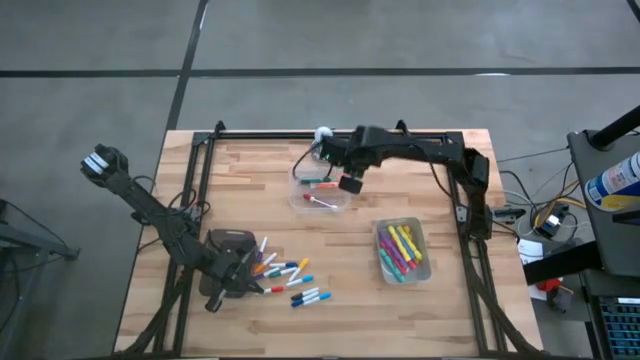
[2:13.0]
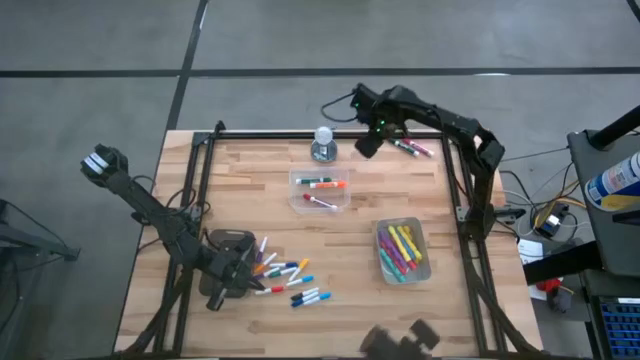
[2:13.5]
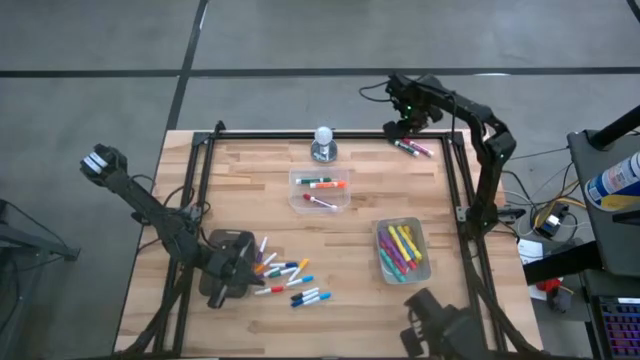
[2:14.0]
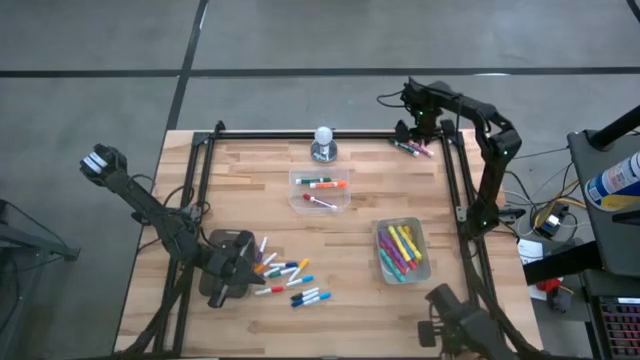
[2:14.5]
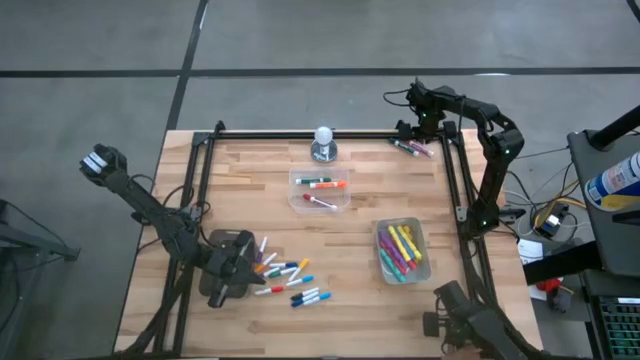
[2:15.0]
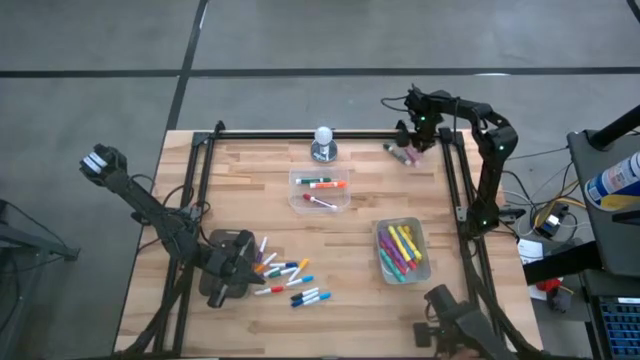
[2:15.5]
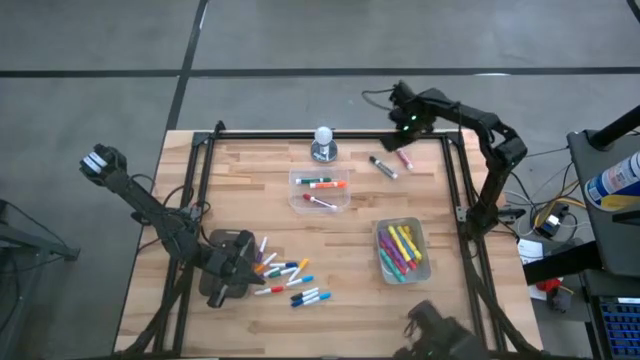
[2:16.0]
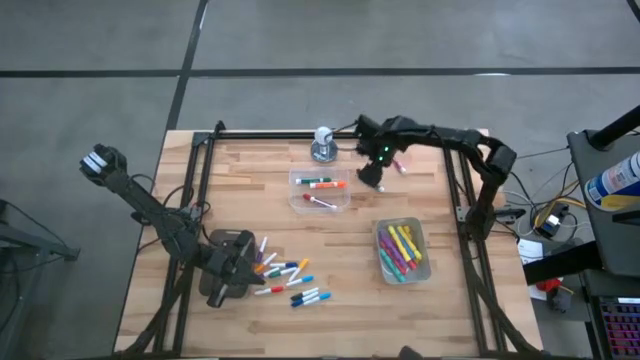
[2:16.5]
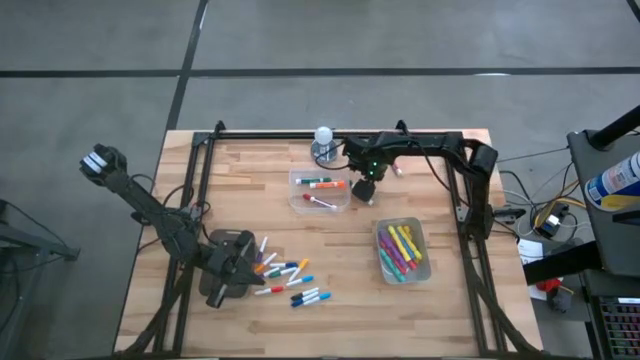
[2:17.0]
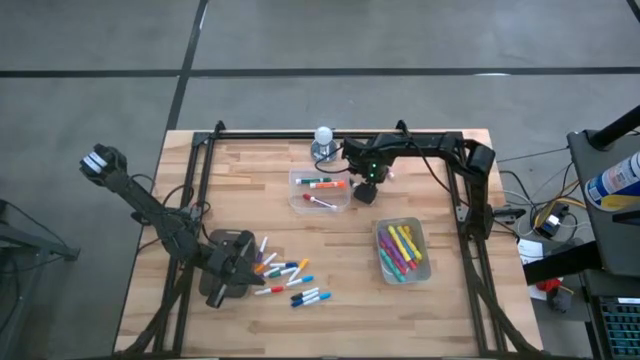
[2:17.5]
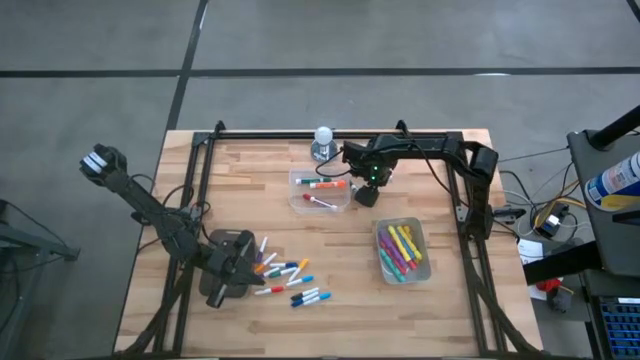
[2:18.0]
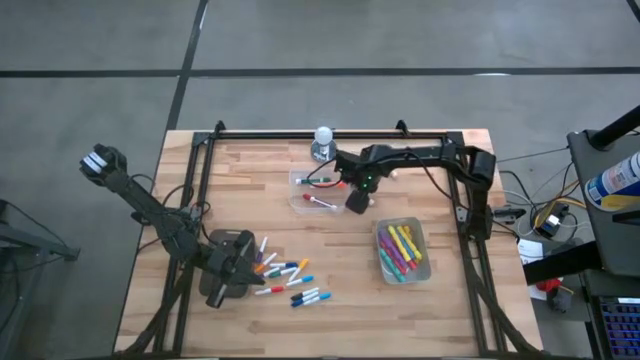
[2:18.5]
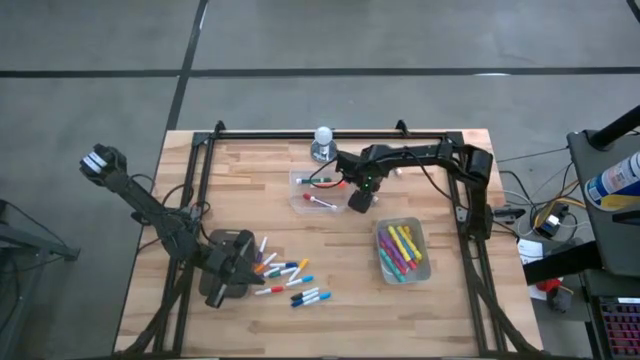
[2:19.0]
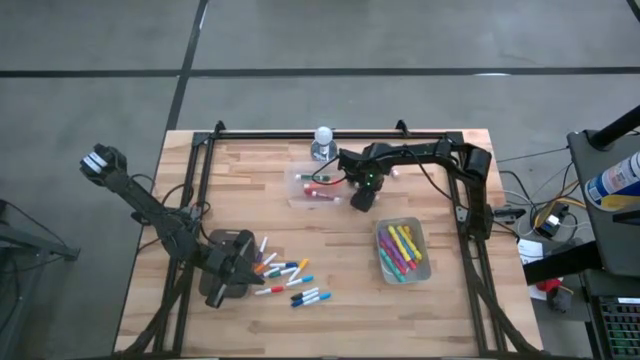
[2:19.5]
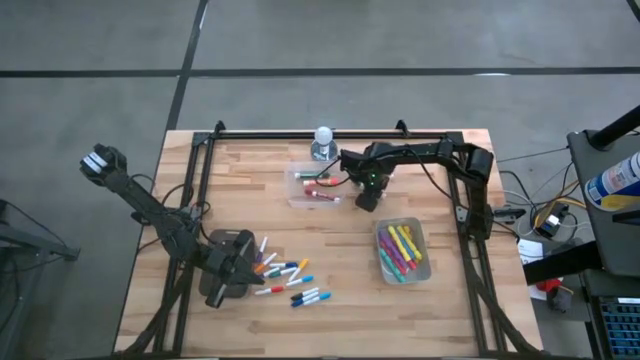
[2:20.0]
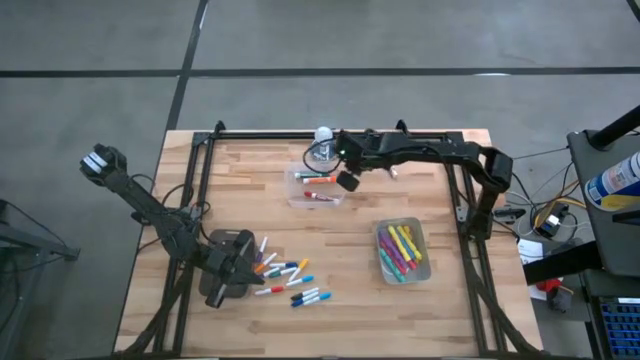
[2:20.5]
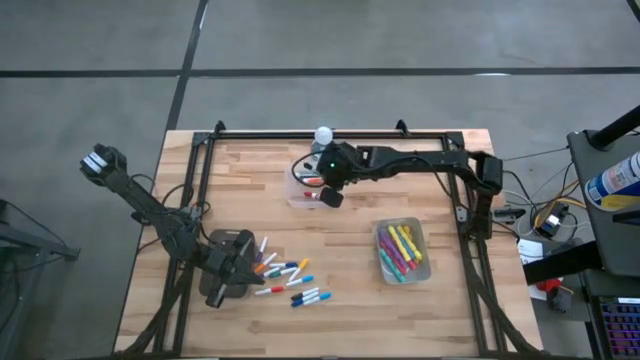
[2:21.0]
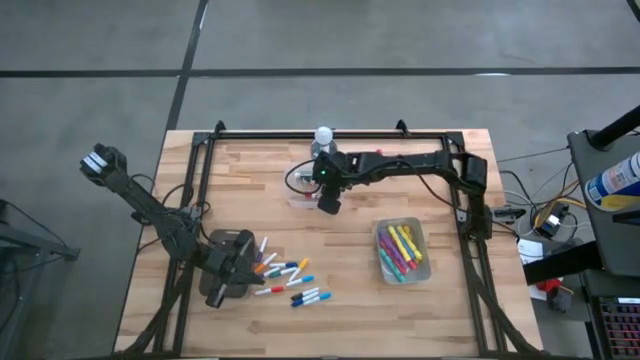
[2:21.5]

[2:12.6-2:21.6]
Task: Pick & Place Markers
Put the green dry erase marker into the transparent bin

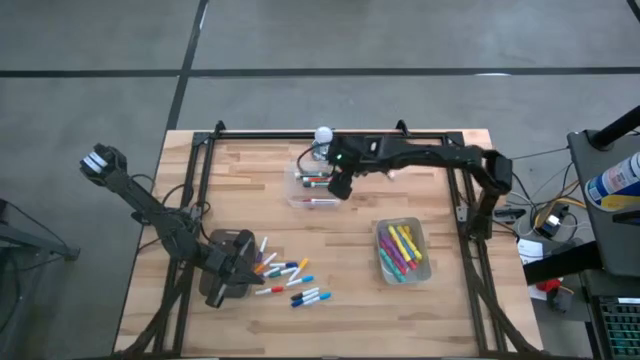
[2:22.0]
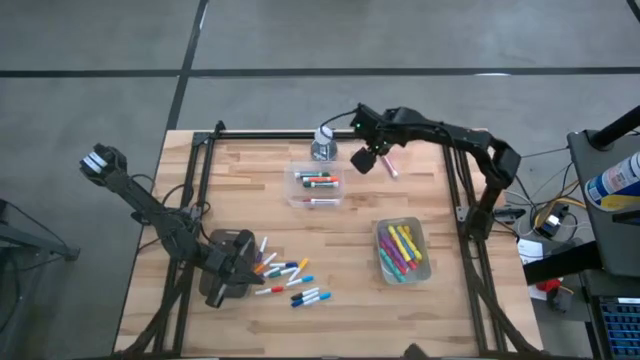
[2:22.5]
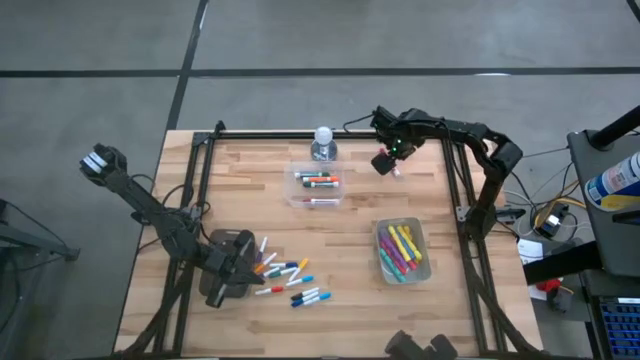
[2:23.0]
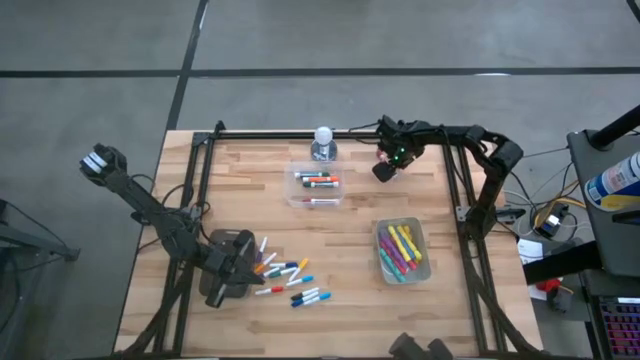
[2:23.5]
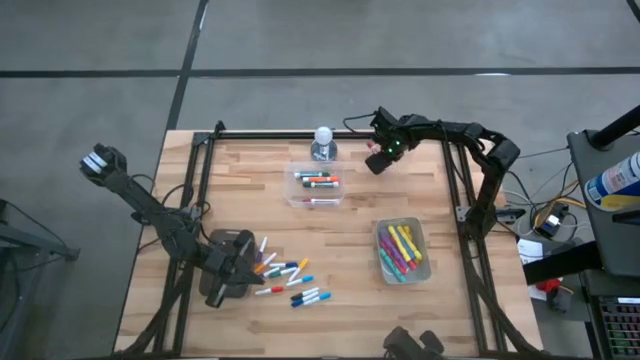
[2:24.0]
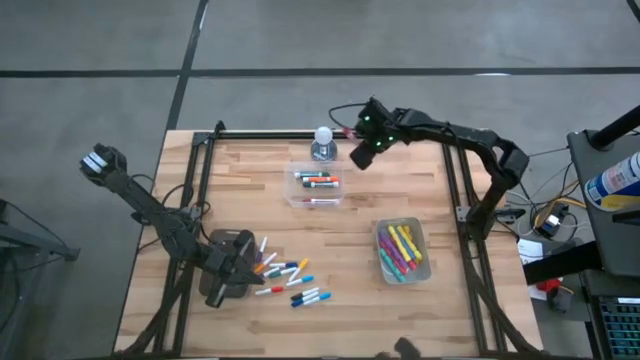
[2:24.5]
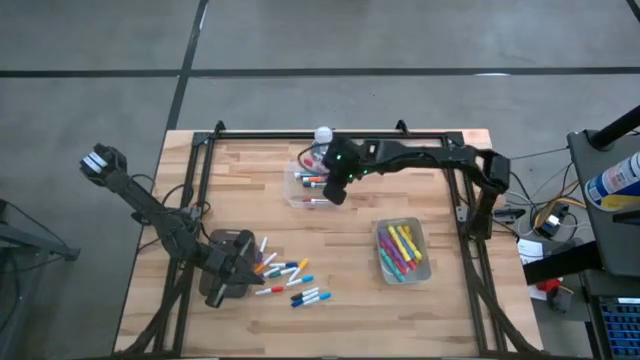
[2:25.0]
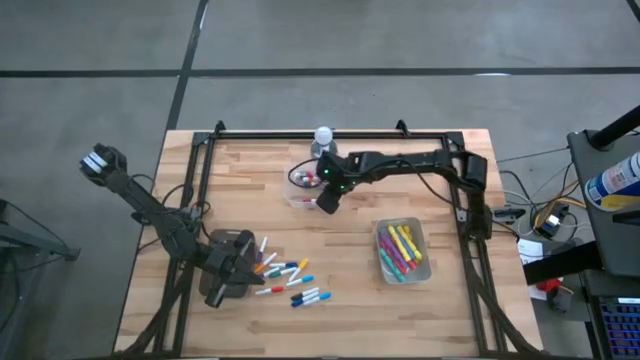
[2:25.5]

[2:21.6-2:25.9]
Put the pink dry erase marker into the transparent bin

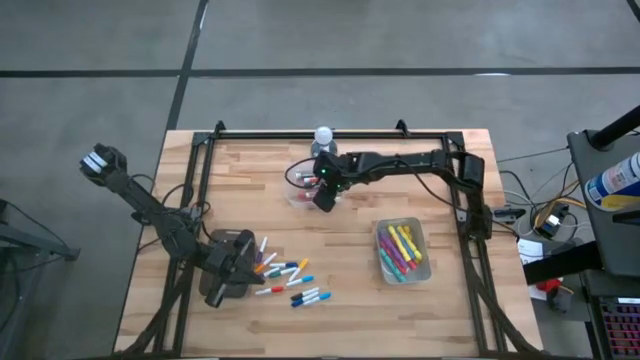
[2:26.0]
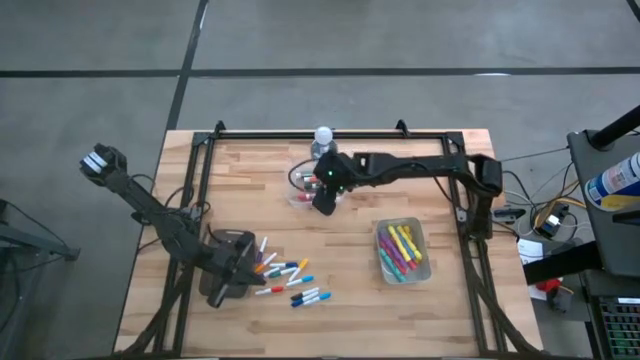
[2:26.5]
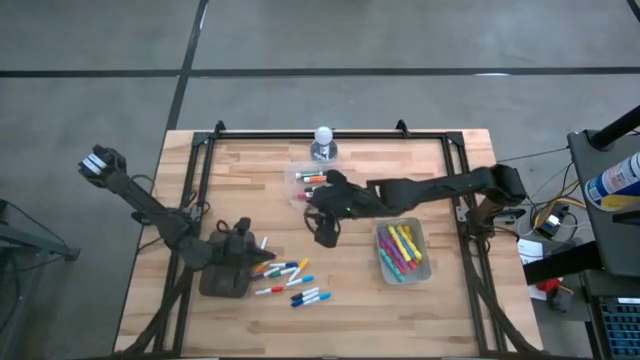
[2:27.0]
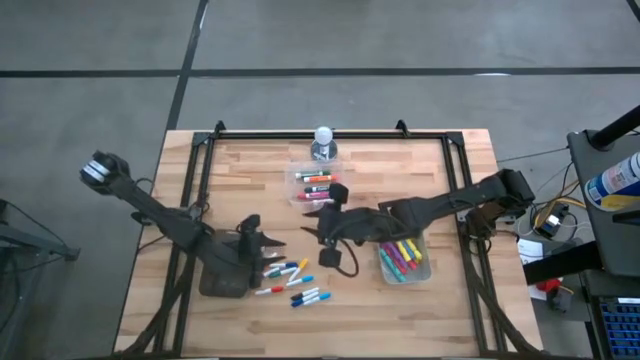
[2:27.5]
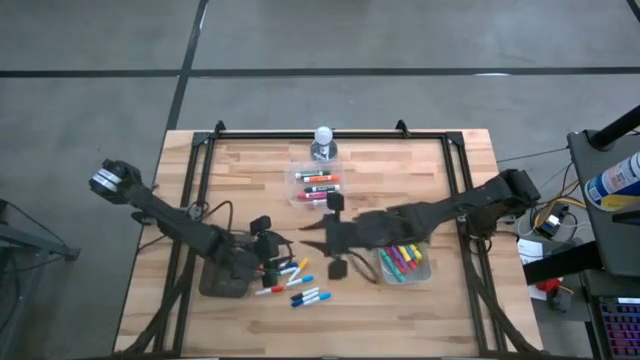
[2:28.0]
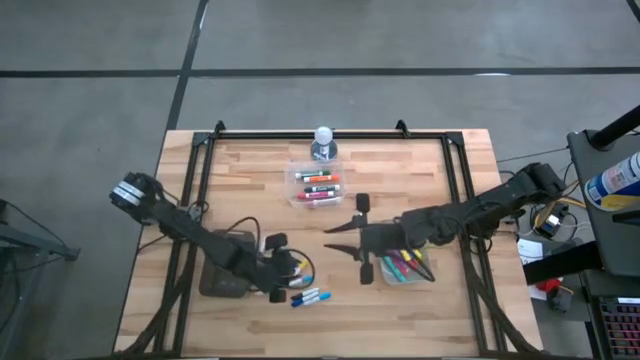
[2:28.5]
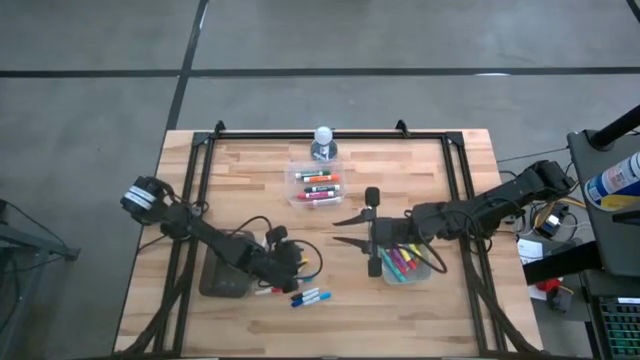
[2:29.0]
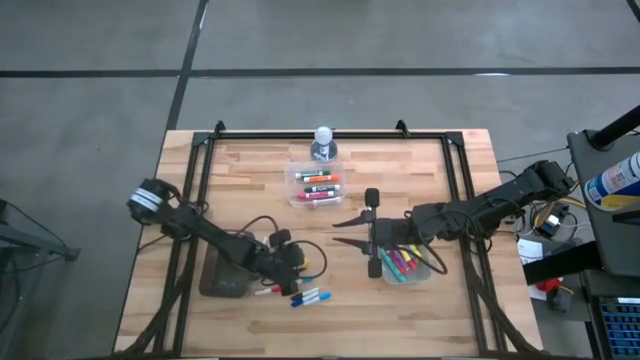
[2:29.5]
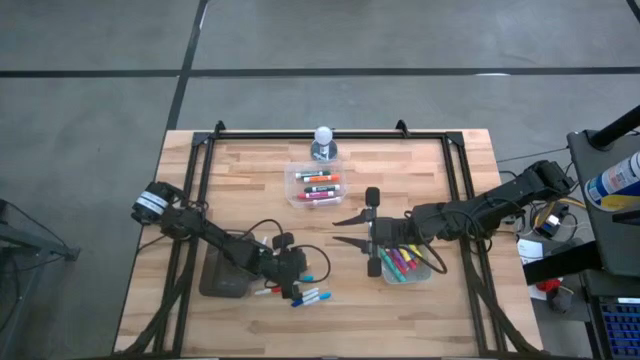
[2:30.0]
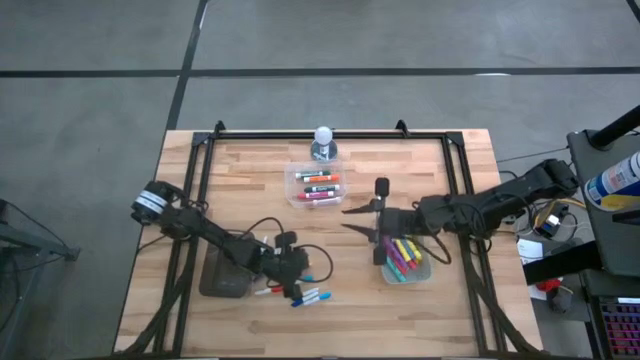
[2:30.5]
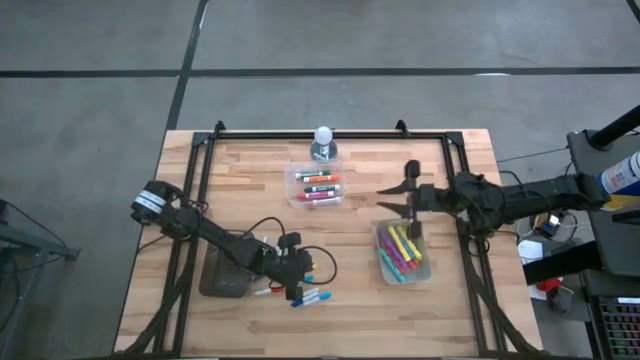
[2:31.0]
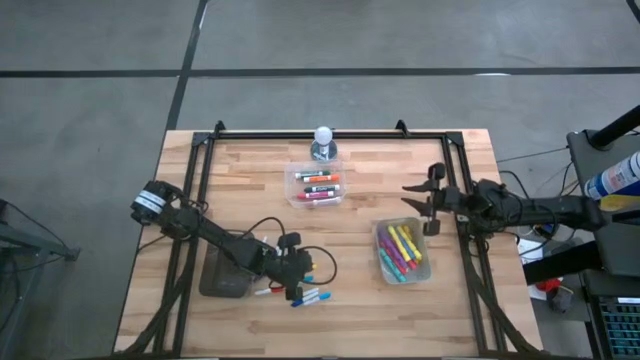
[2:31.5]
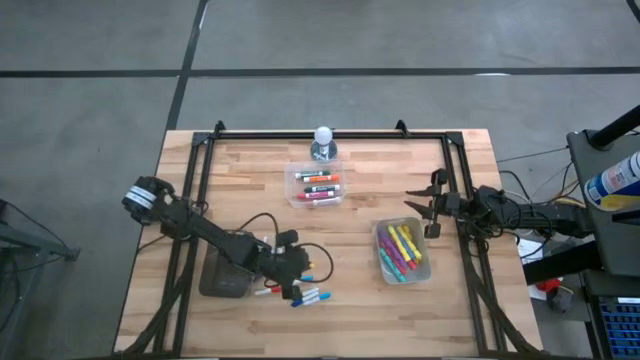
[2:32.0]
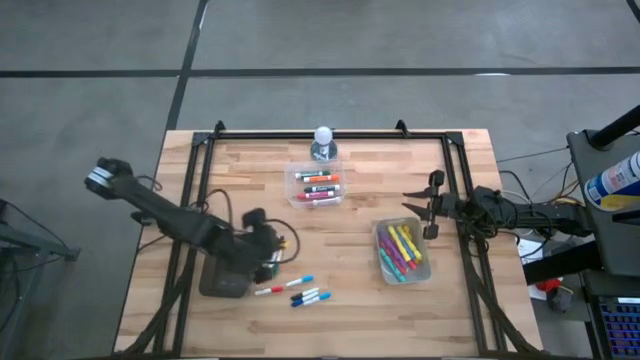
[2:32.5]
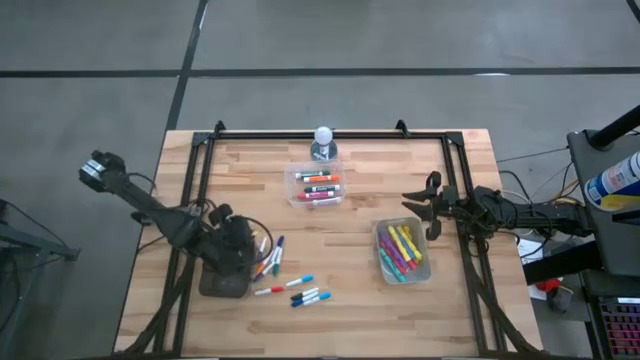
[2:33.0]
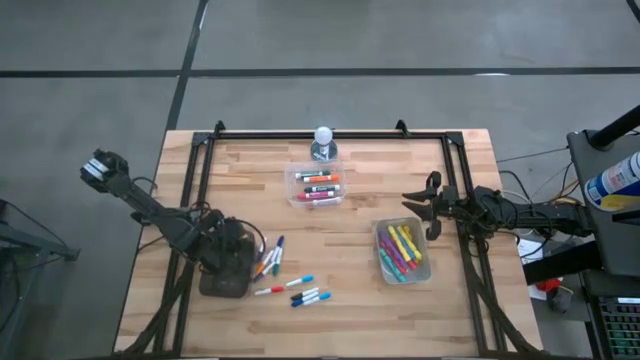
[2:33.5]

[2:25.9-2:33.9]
Put the yellow mini marker into the transparent black bin

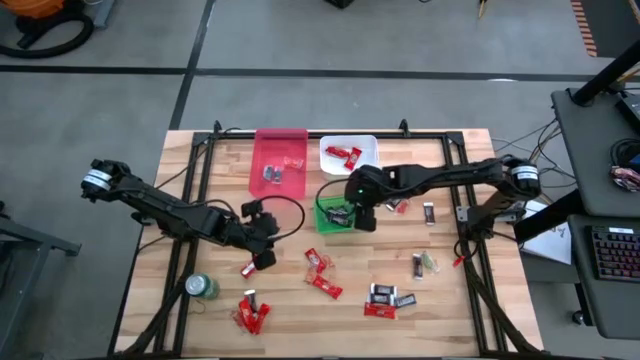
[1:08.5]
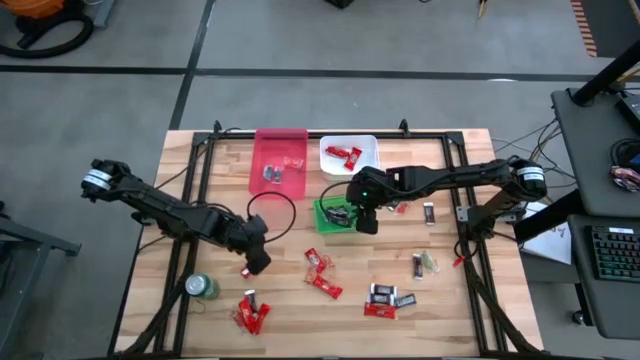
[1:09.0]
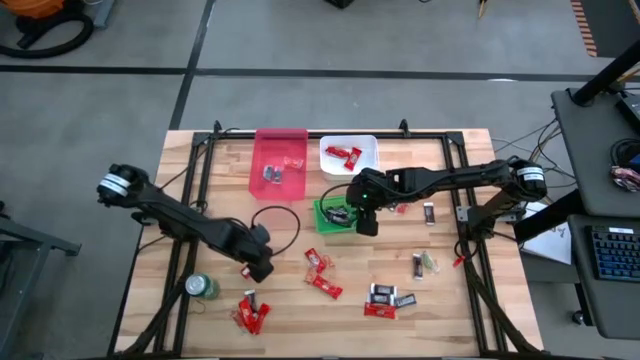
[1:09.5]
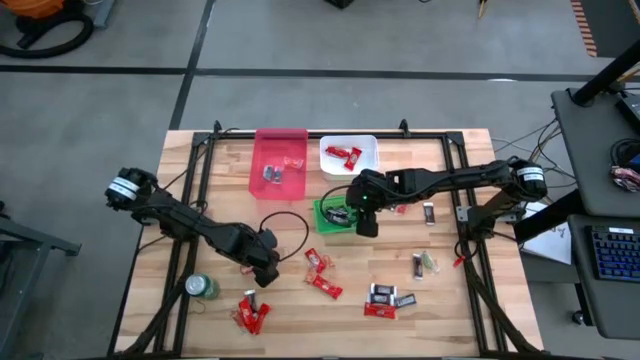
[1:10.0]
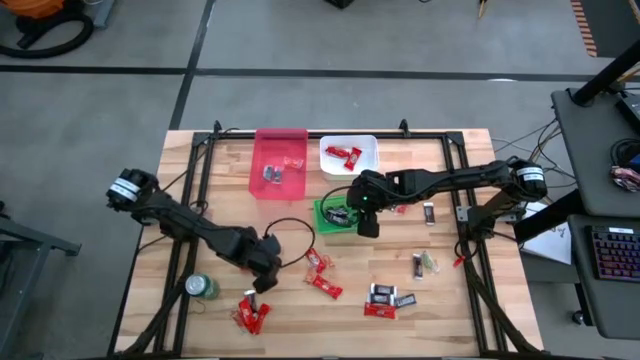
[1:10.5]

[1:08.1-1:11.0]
Task: Sort candy
Put the red chocolate bar into the white bin
